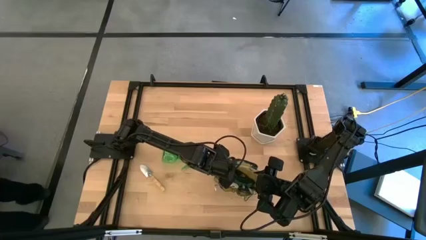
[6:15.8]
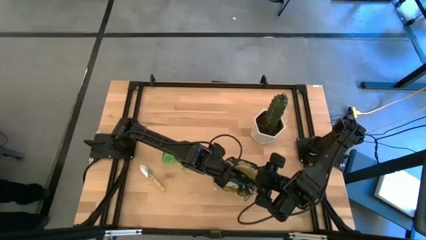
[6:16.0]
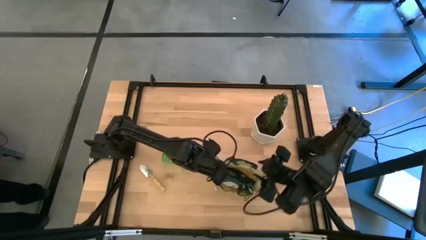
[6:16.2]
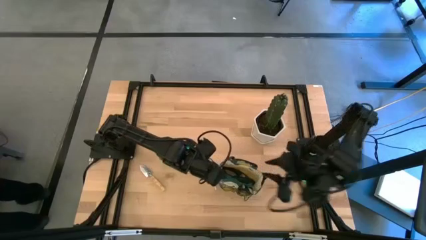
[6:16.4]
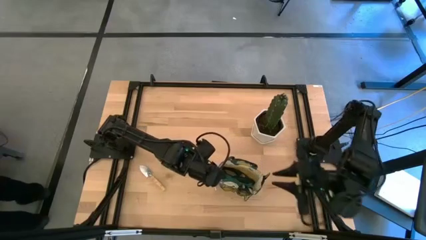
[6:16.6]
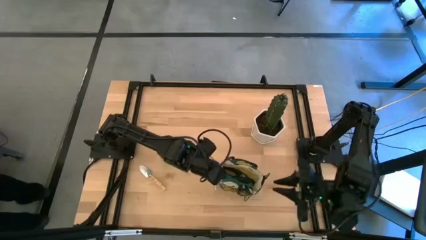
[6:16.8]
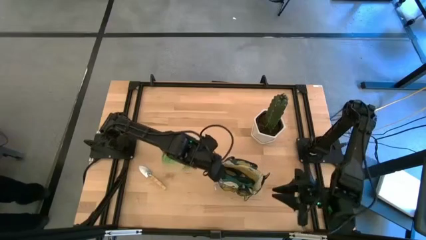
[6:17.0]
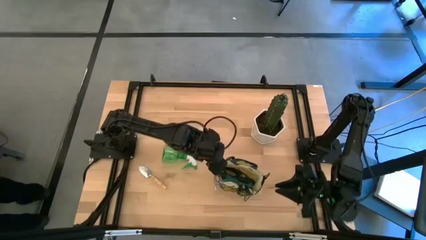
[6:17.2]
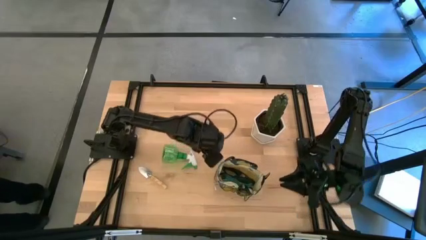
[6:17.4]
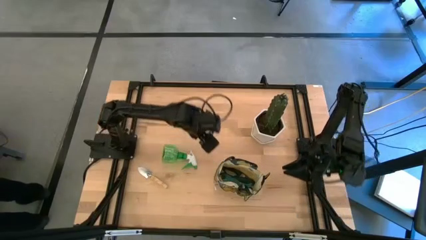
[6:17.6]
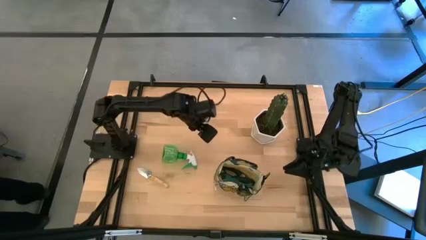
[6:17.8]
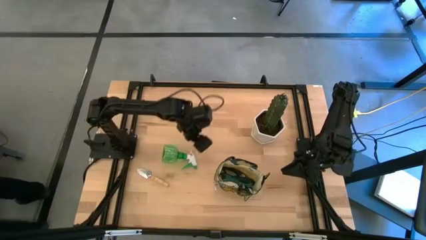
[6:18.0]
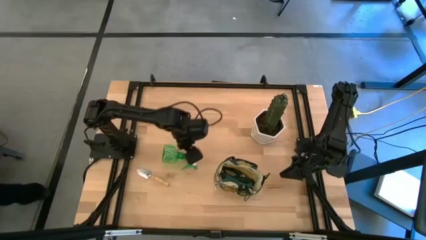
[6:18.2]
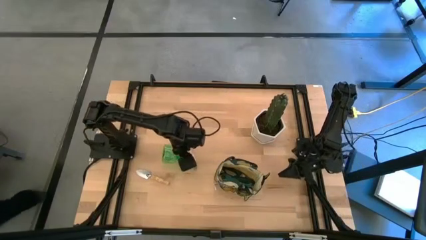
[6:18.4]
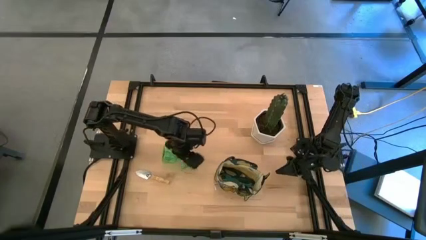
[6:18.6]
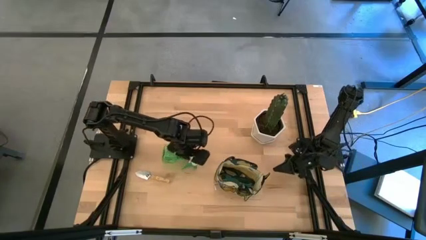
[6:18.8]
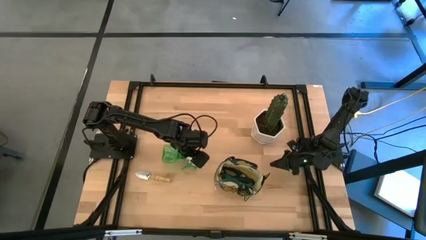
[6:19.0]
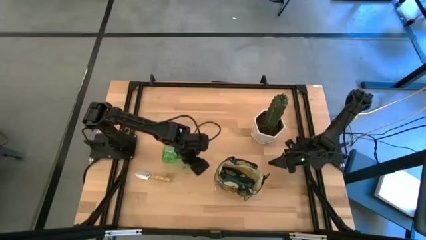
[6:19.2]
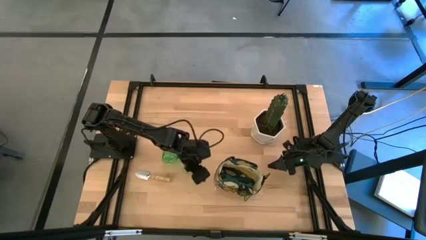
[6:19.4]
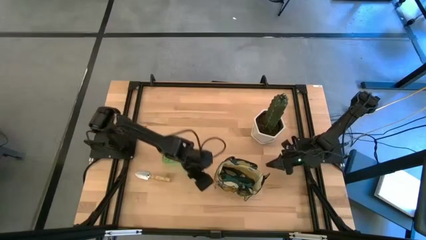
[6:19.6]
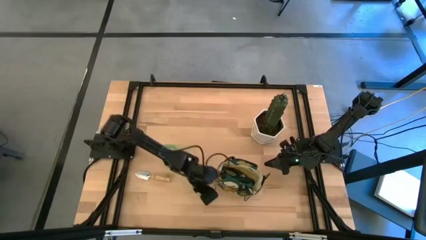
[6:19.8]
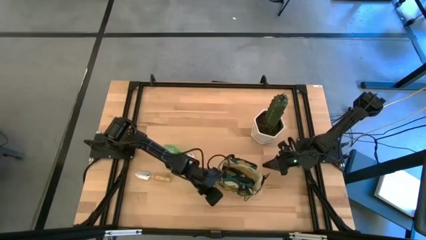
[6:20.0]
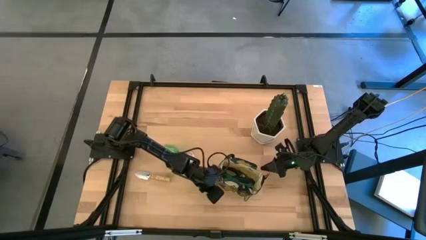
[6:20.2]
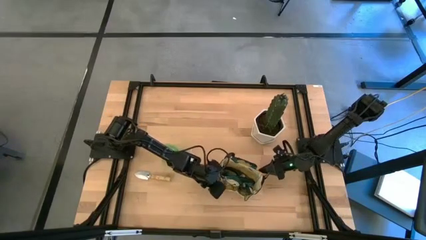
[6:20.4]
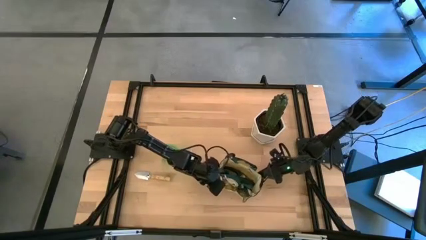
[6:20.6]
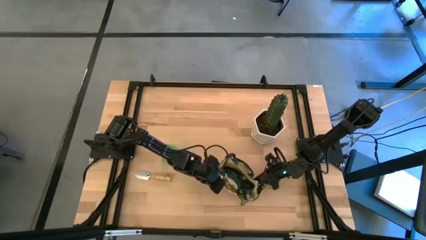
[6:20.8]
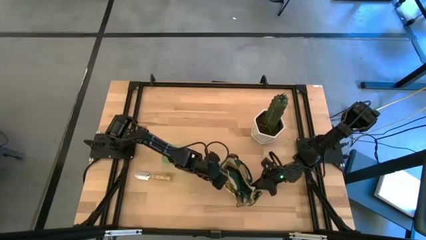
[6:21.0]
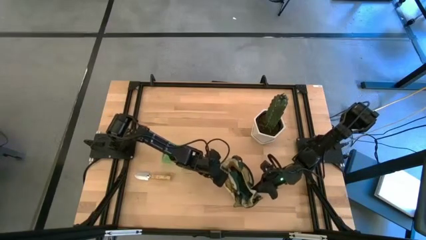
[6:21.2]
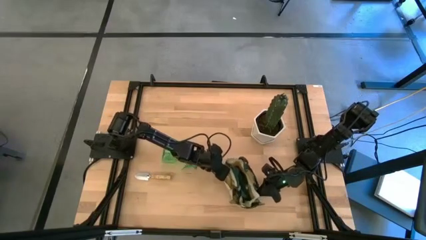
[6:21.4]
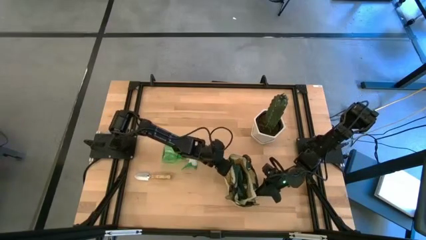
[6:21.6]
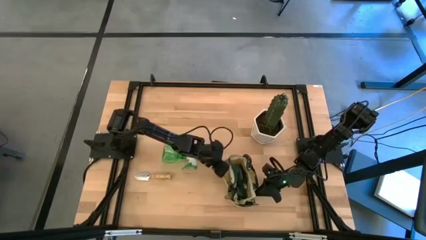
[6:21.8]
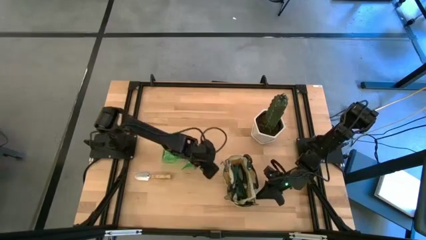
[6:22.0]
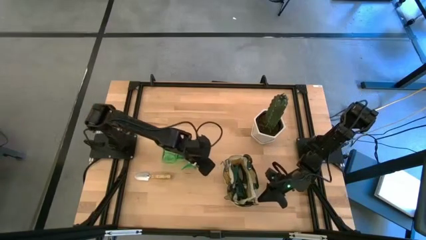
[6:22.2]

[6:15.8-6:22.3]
Task: Pick & Place Garden tools in Gardening bag
Adjust the white bag

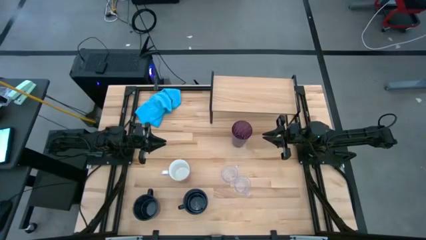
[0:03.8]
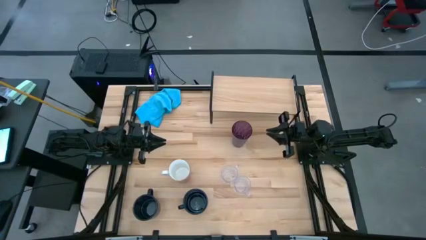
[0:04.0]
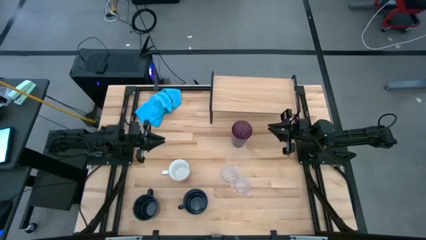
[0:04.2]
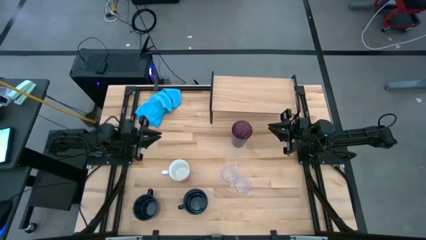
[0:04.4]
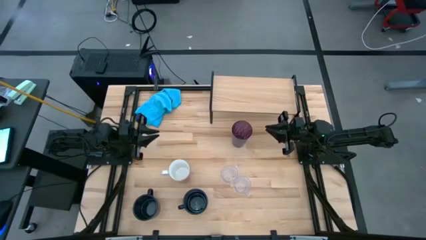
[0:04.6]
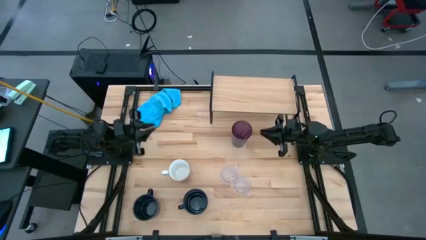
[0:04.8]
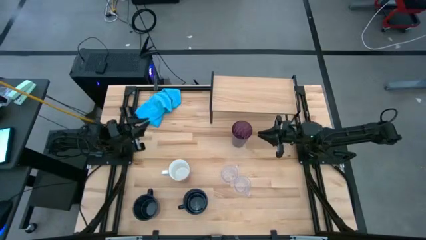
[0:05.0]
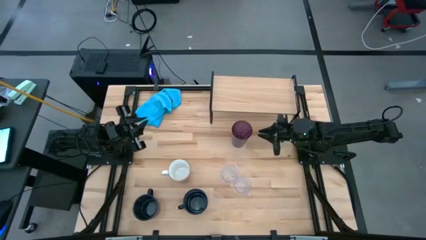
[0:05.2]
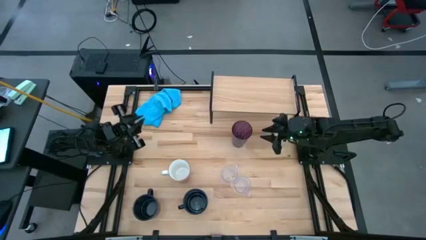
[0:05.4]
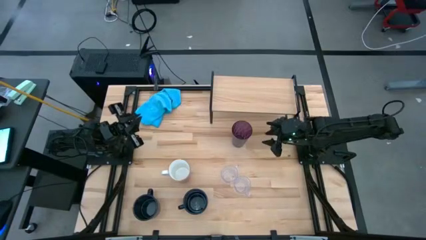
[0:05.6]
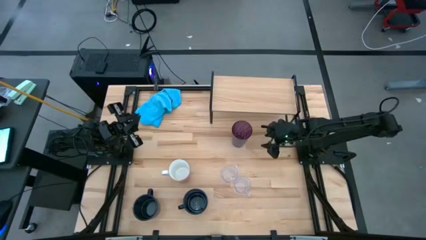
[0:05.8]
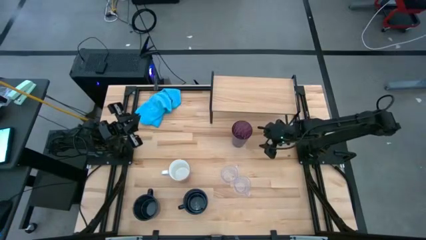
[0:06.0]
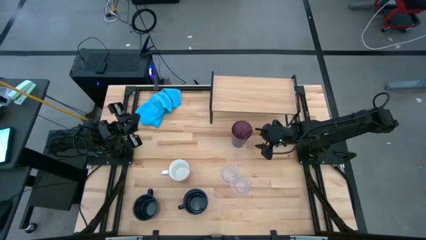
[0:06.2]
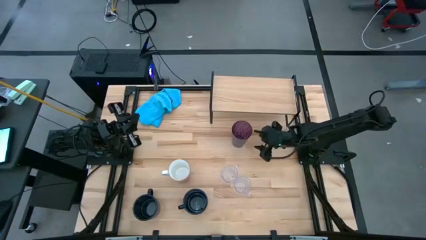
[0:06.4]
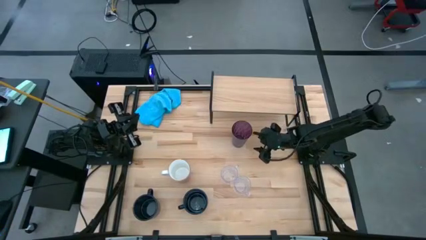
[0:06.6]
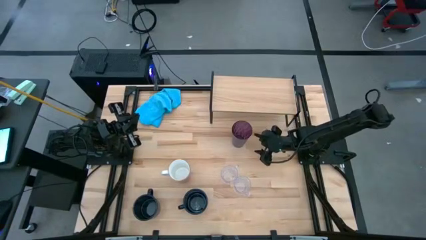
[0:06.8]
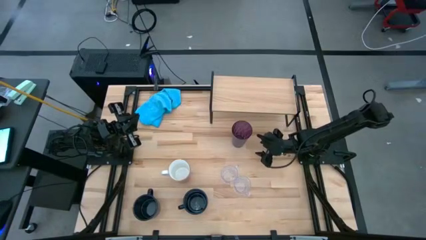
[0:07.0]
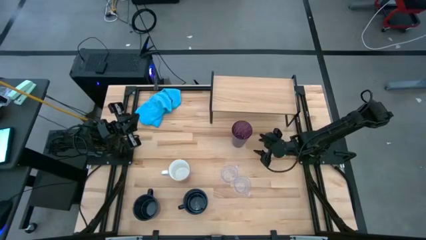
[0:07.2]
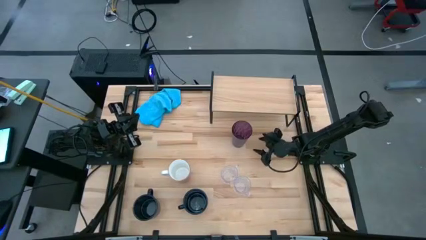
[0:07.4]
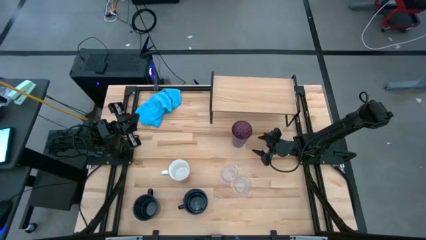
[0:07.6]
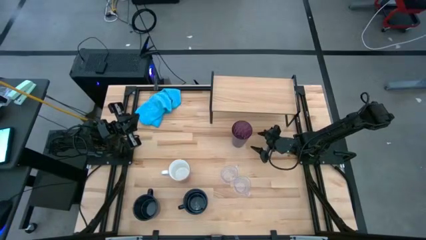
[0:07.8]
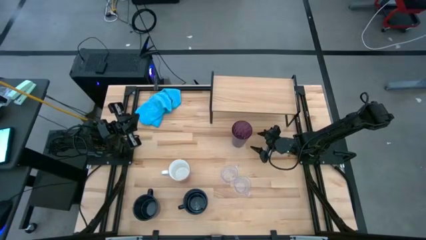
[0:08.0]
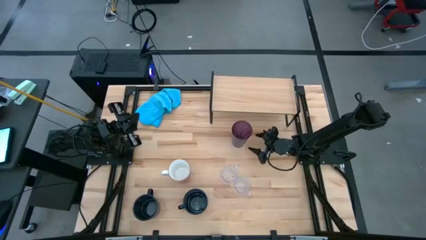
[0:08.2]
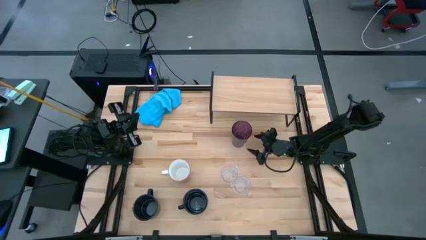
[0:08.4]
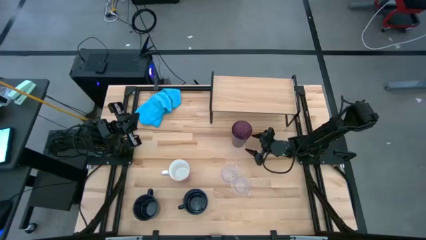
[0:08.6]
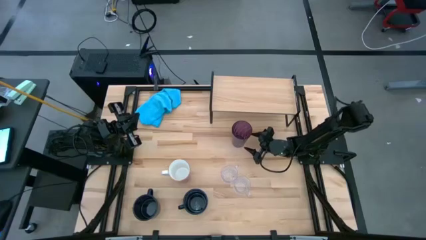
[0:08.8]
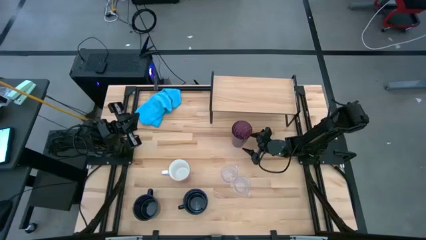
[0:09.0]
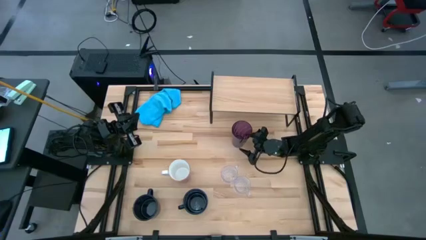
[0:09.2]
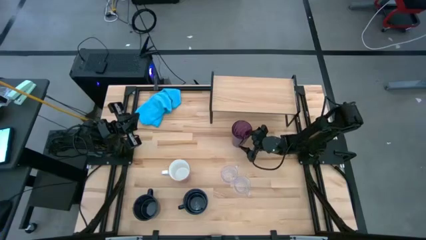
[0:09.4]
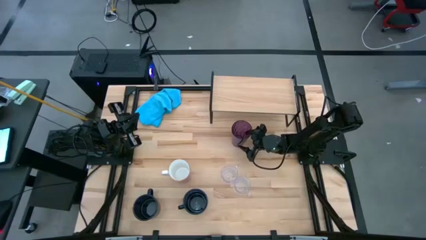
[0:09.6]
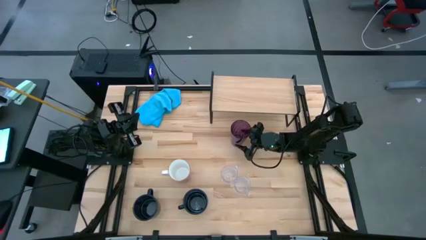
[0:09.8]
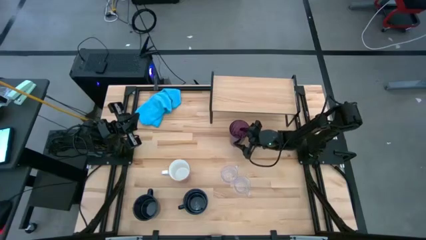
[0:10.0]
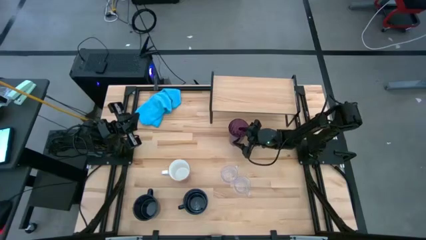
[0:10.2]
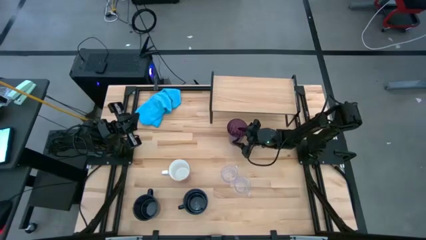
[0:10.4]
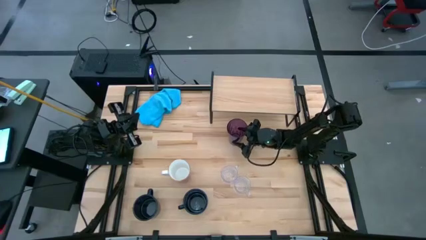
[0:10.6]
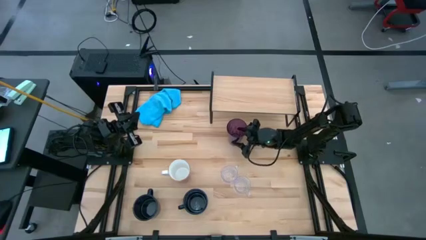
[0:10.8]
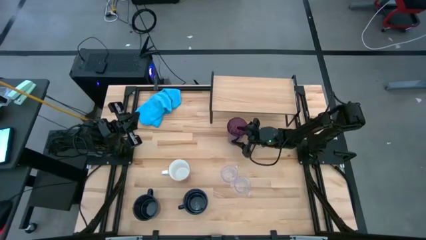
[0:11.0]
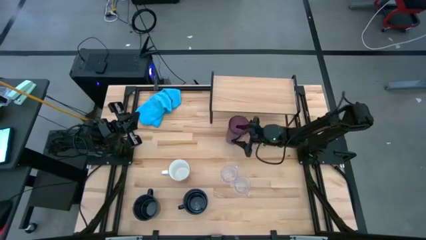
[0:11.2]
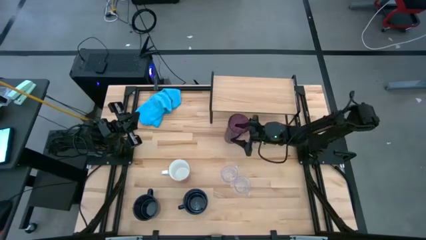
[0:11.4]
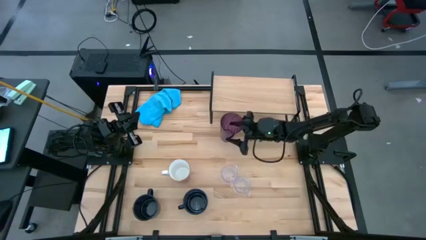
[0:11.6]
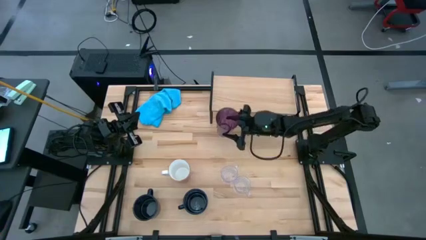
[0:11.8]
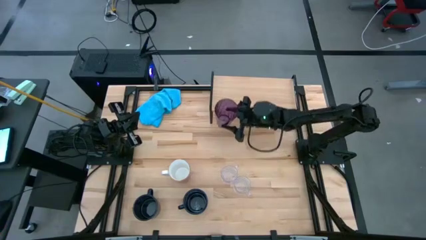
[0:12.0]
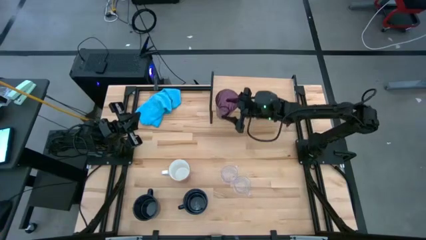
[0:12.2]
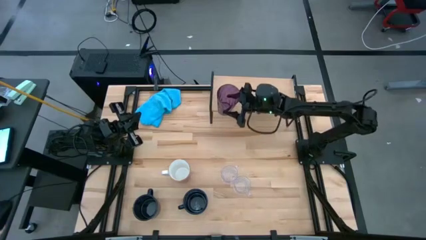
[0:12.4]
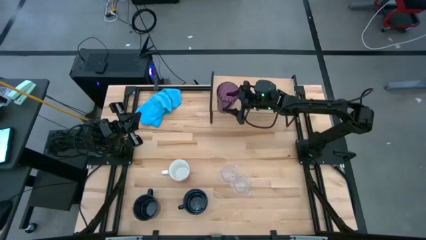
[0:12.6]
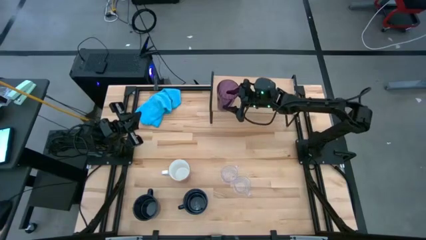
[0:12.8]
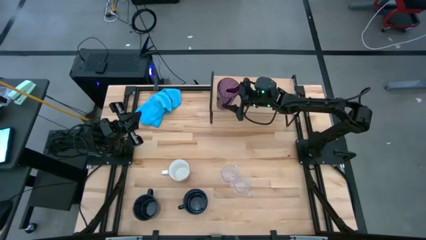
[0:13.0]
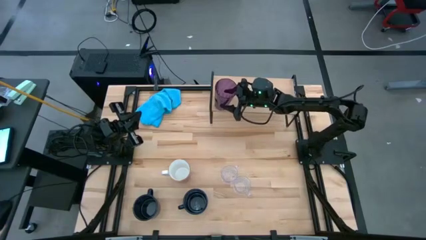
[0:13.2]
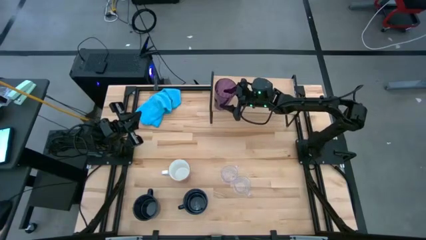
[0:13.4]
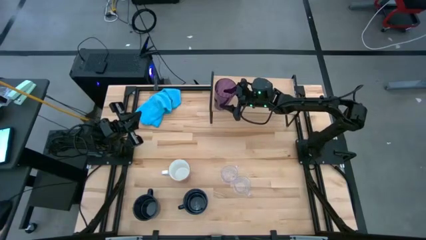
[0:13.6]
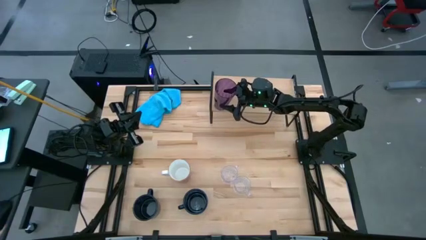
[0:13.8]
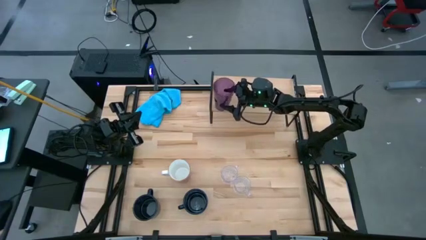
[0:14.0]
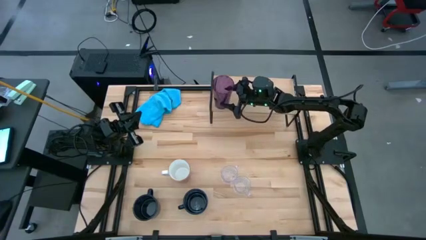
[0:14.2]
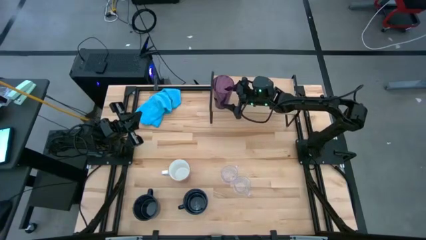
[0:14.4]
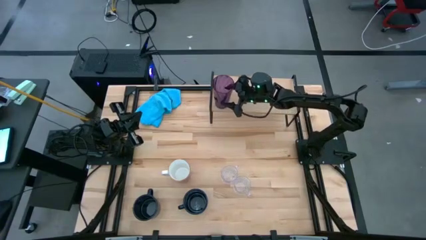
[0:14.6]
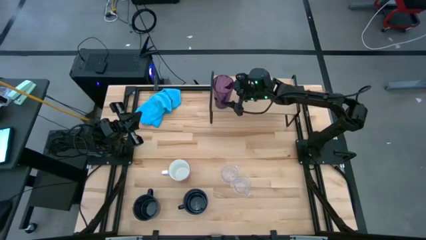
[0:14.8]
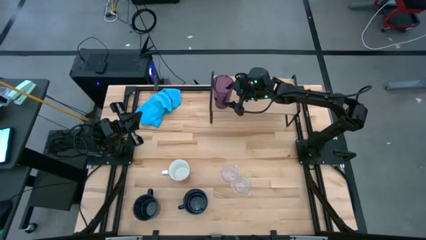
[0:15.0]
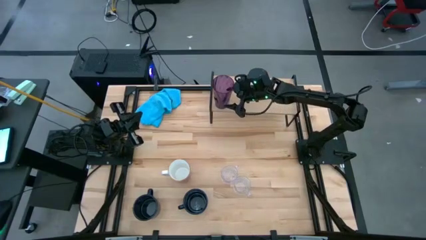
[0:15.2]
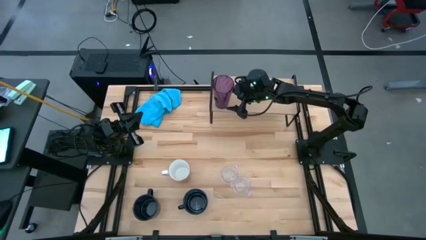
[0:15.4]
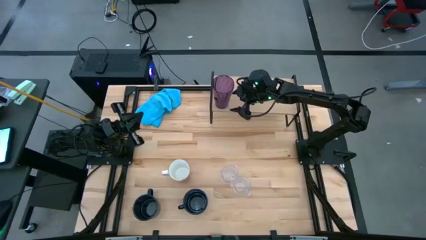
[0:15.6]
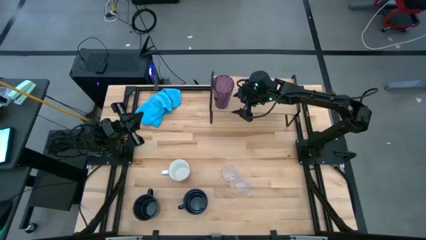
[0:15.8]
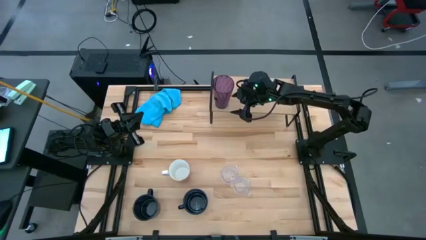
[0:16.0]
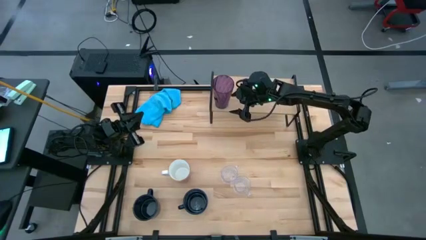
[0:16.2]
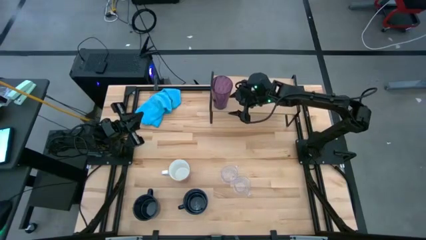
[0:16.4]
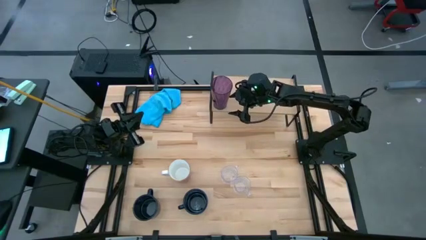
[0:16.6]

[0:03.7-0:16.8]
Task: Stack small to large cups/mugs on shelf
Put the violet cup on the shelf
